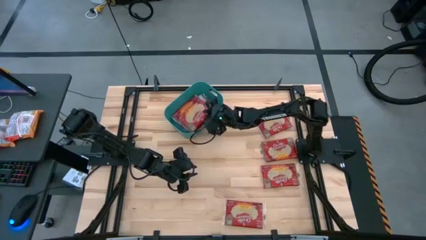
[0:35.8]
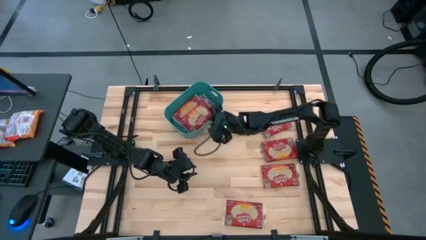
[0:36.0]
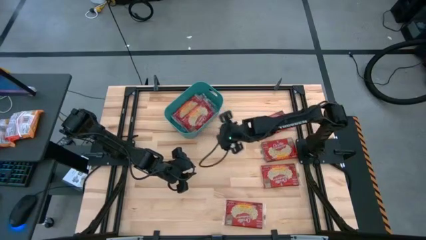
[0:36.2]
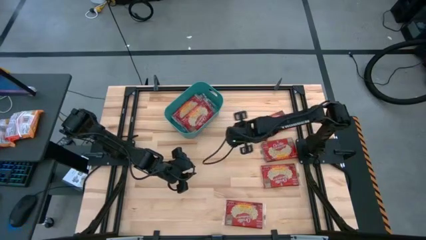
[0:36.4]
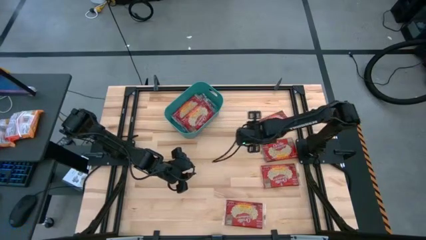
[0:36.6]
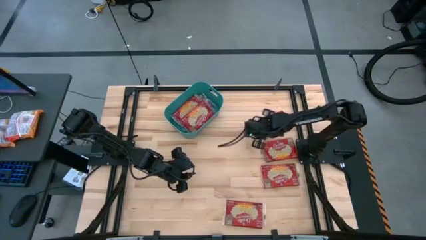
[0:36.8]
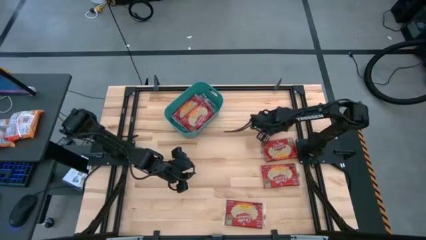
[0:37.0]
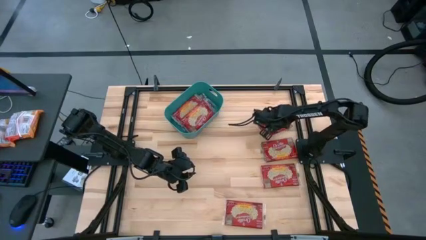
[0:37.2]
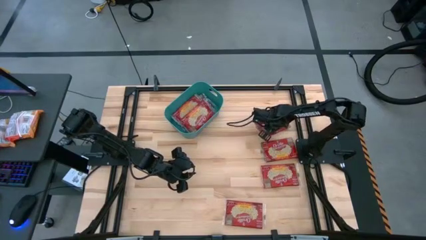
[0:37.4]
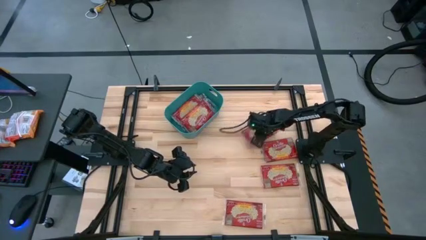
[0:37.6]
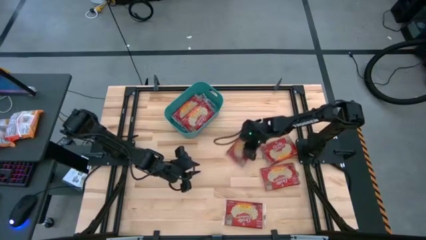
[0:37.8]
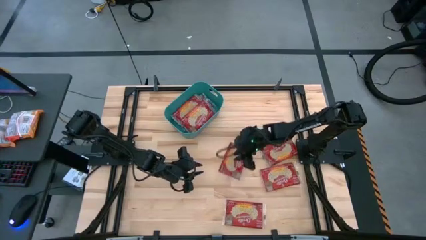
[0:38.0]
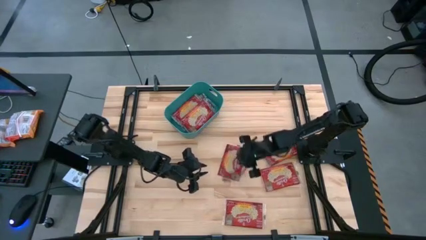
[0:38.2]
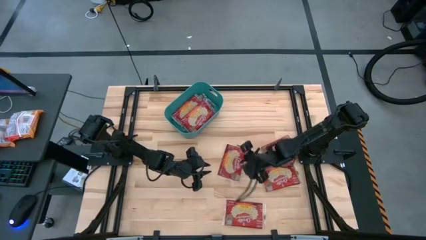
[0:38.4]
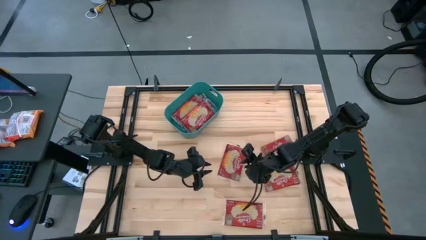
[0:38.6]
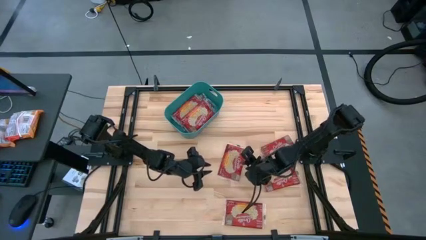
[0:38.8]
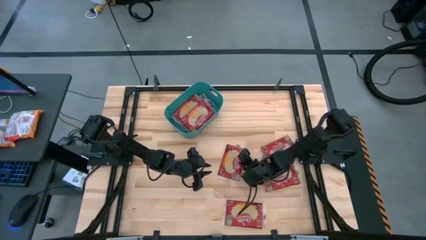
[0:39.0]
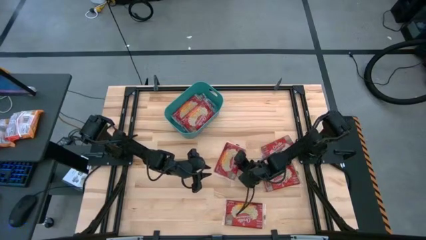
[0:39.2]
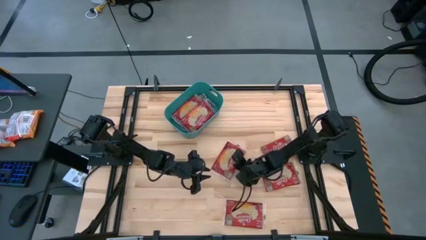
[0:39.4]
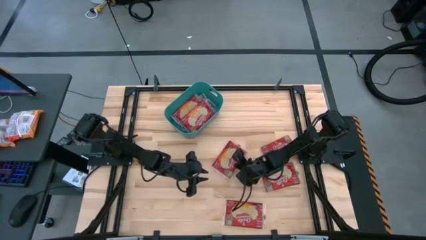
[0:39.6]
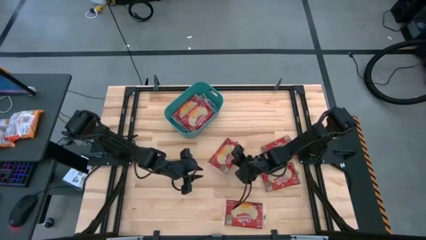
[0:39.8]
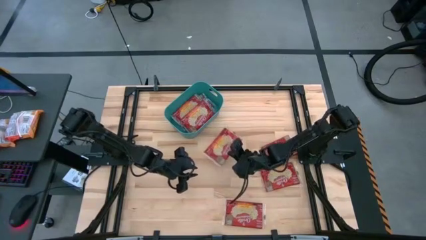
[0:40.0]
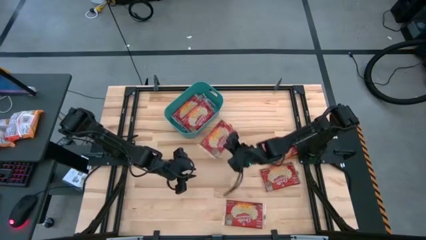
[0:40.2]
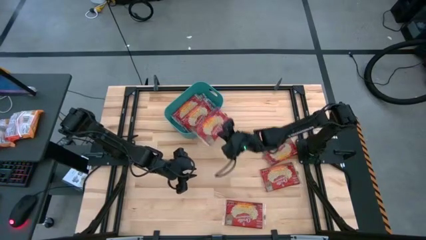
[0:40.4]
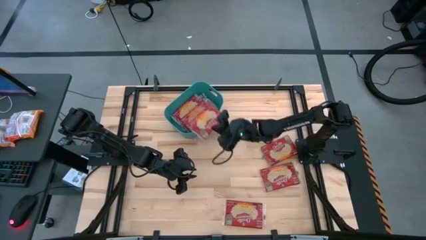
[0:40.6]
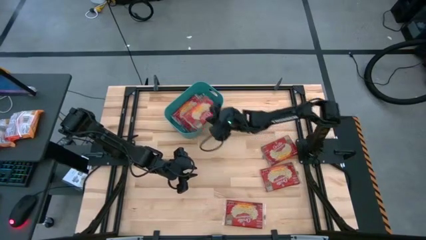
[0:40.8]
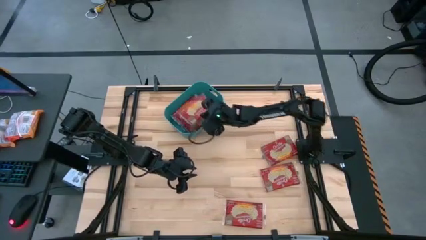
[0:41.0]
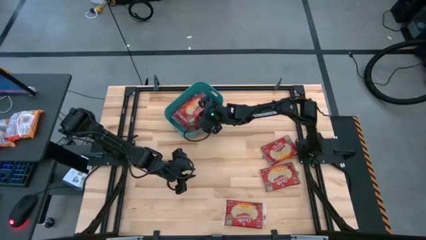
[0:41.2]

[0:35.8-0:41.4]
Task: Sort popcorn bags into baskets
Put the red popcorn pack into the blue bin

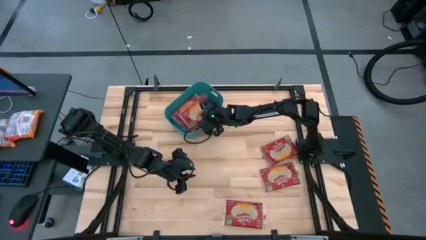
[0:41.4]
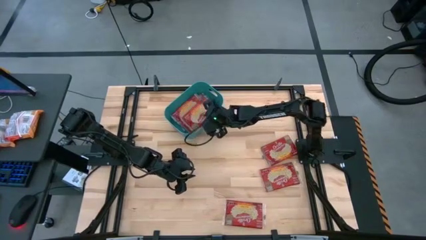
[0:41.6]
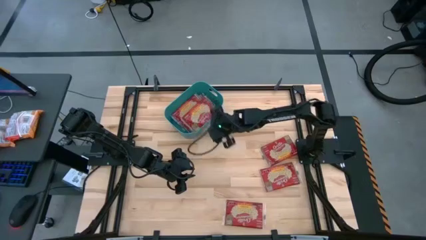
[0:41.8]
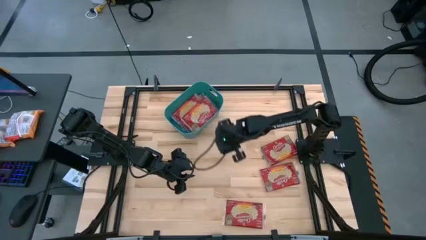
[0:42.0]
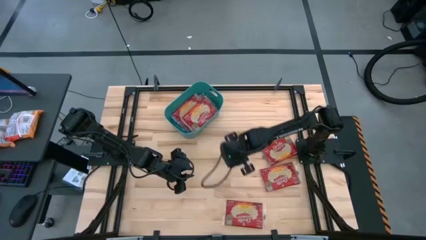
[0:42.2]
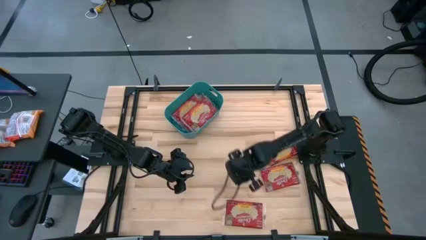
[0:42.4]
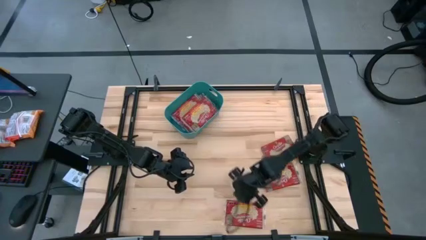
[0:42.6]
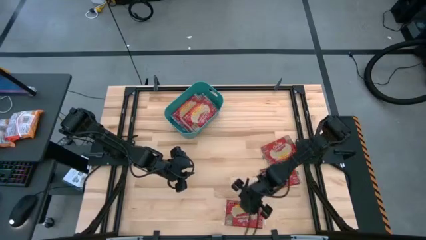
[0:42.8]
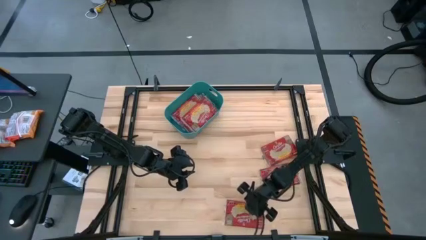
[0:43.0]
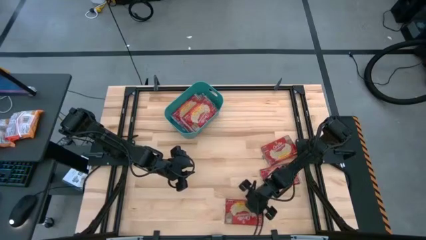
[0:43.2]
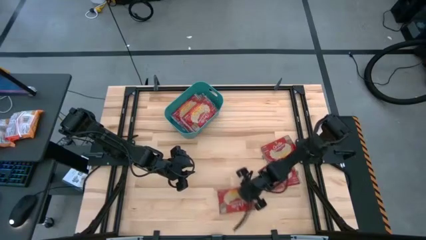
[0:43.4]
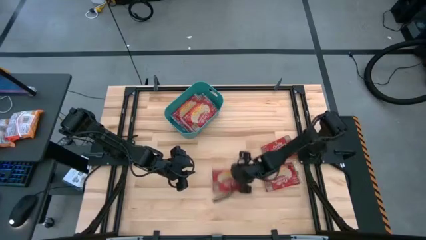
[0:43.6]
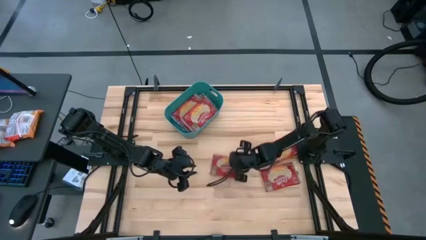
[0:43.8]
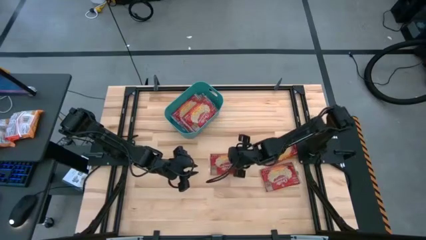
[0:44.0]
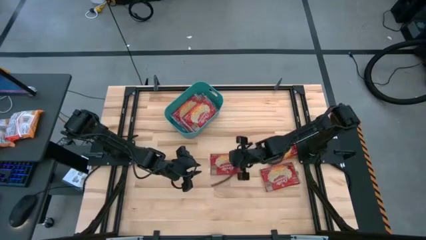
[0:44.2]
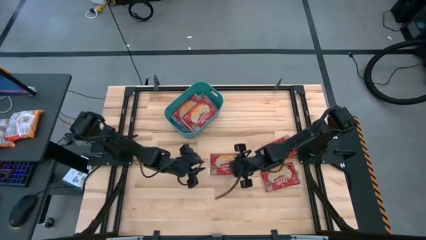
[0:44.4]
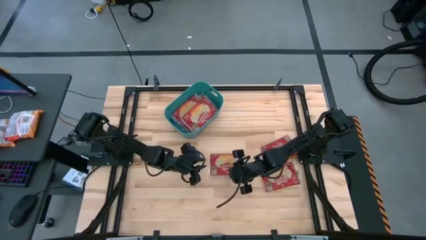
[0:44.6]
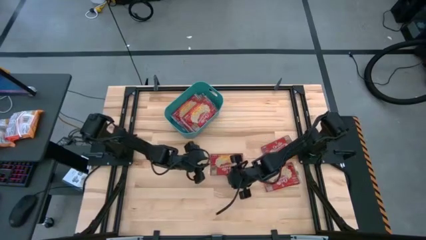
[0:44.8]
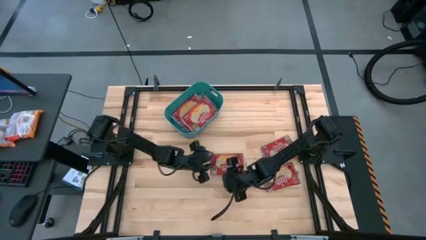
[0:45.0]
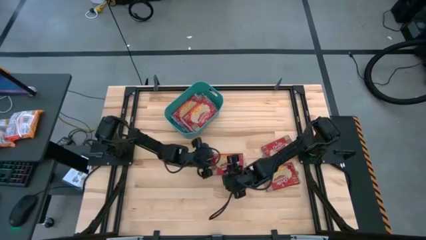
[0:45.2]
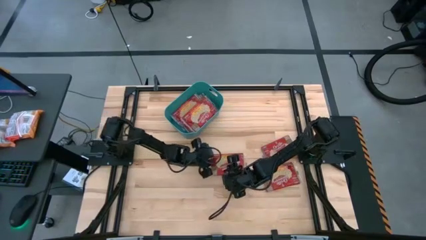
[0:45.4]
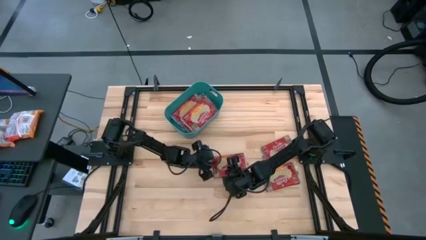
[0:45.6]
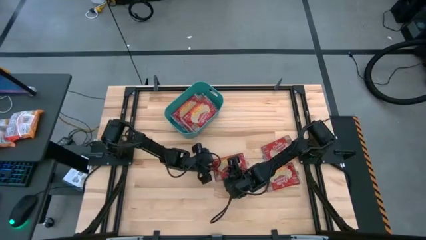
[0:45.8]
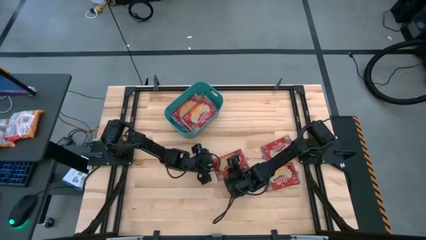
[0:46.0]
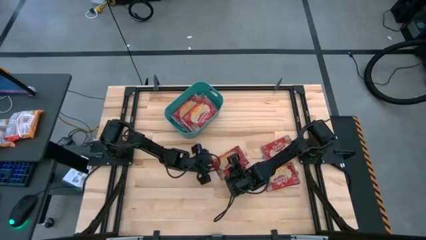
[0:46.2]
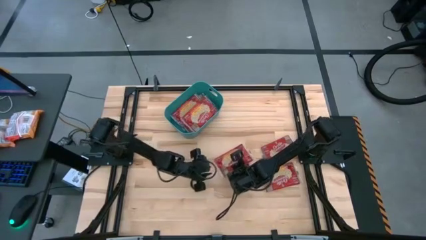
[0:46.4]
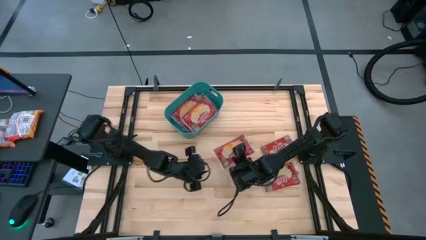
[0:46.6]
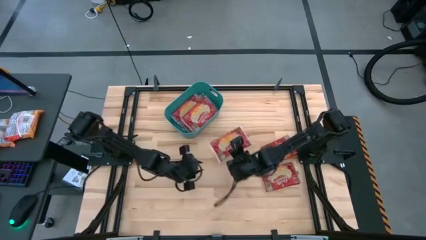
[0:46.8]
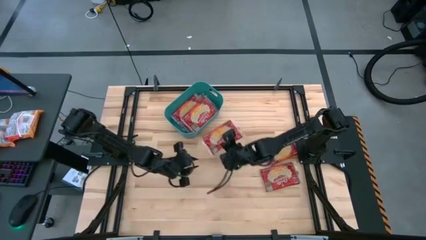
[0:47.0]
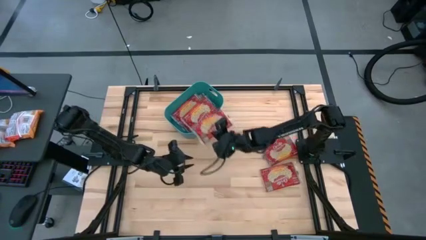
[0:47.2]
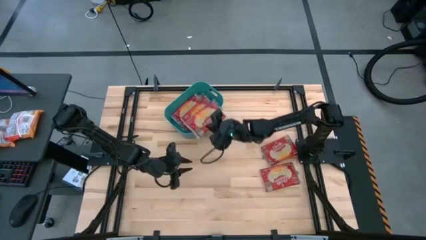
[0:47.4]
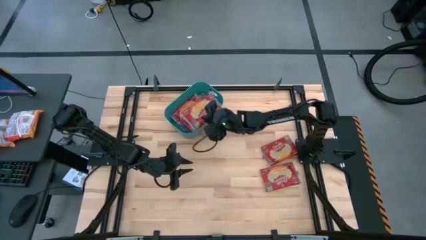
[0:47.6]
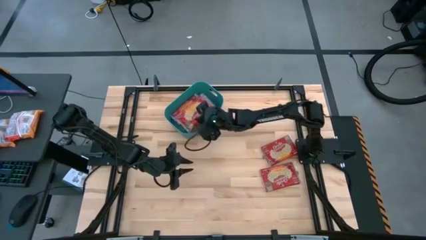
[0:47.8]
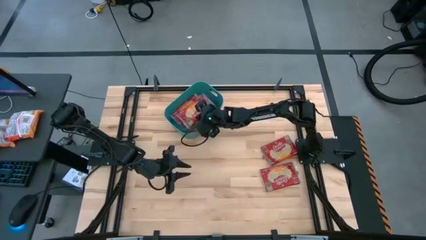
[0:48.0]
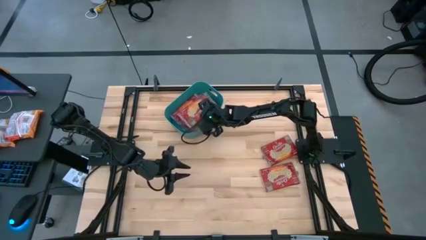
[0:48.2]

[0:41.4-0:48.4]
Put the red popcorn pack into the blue bin

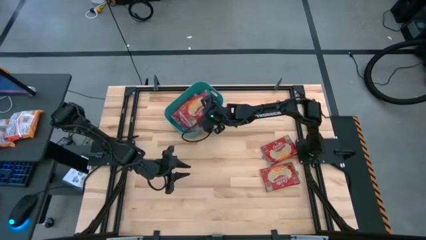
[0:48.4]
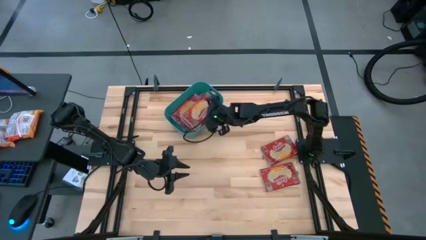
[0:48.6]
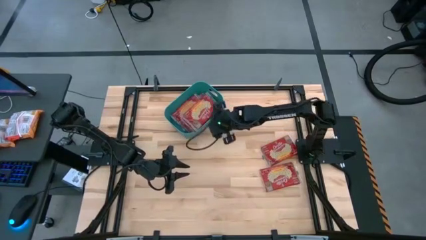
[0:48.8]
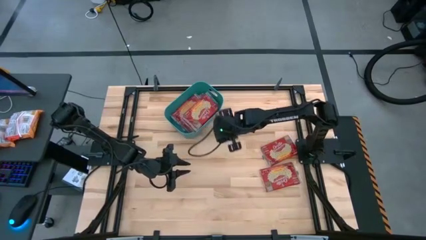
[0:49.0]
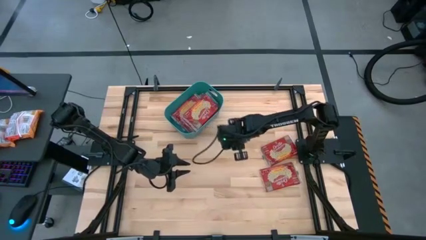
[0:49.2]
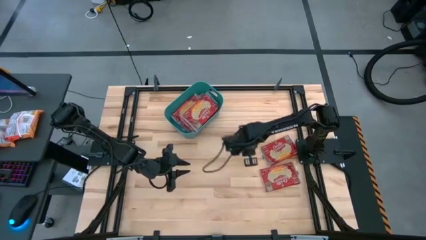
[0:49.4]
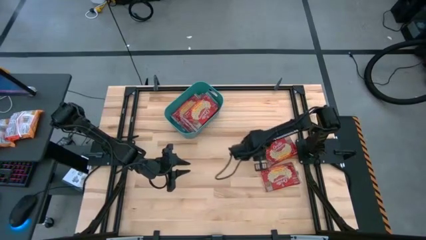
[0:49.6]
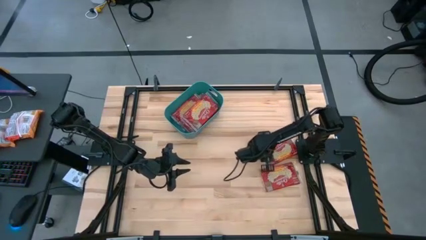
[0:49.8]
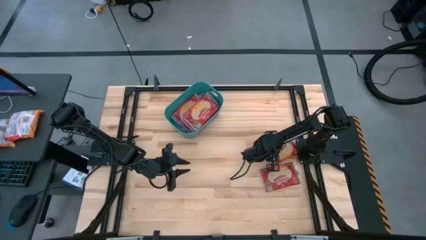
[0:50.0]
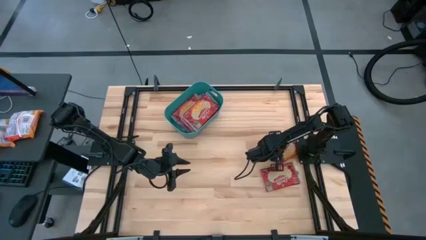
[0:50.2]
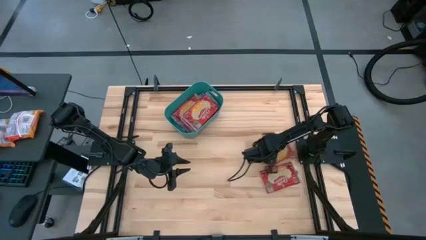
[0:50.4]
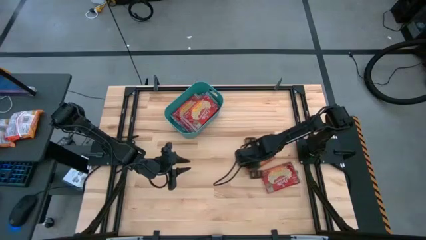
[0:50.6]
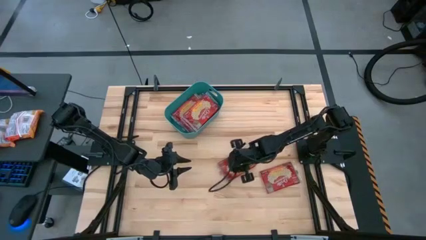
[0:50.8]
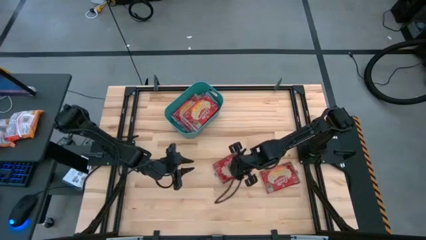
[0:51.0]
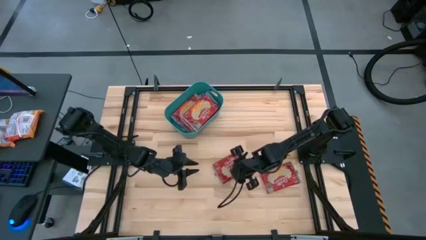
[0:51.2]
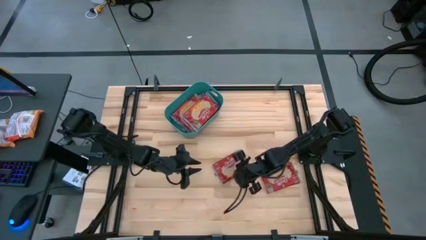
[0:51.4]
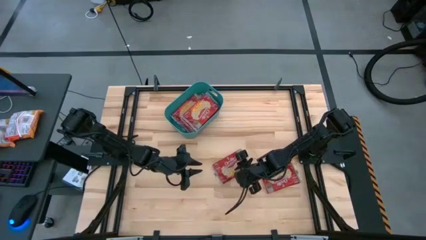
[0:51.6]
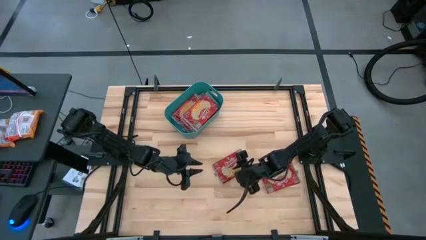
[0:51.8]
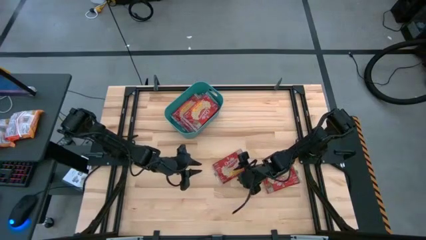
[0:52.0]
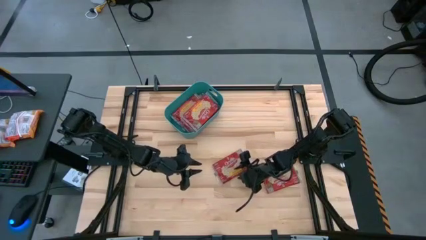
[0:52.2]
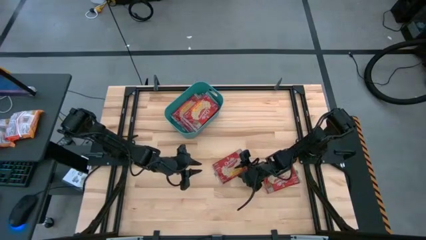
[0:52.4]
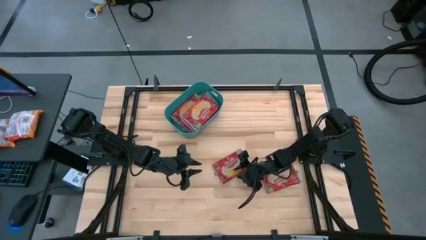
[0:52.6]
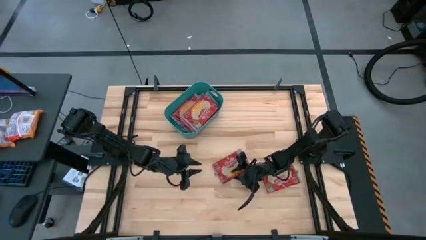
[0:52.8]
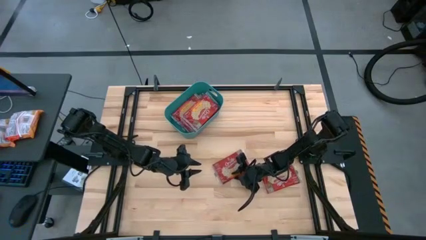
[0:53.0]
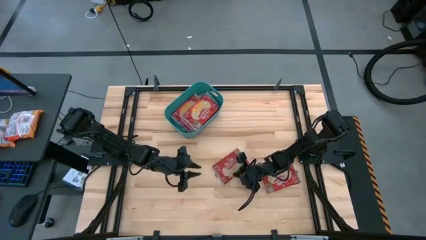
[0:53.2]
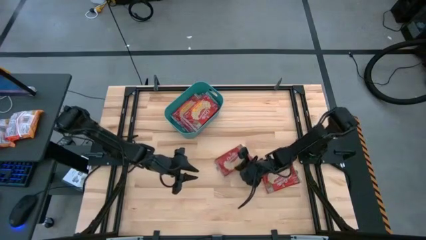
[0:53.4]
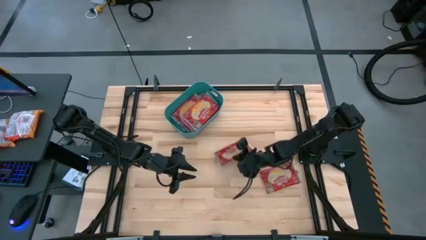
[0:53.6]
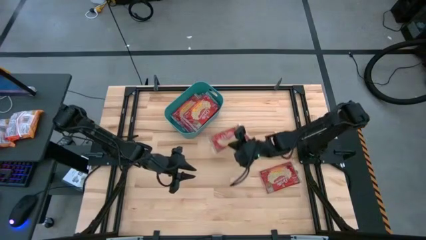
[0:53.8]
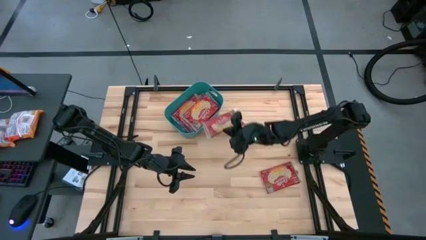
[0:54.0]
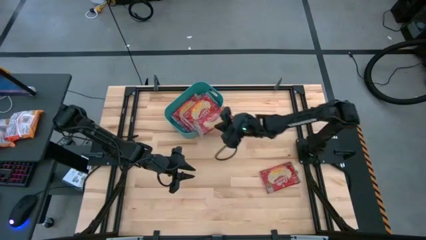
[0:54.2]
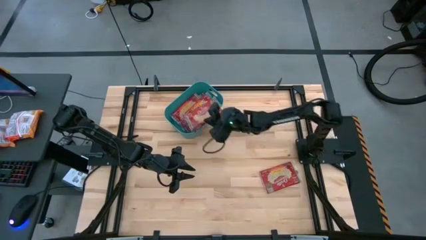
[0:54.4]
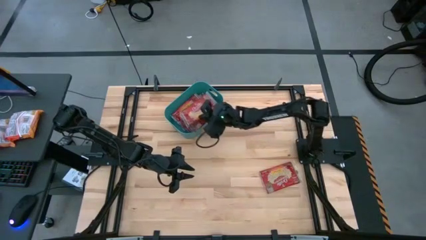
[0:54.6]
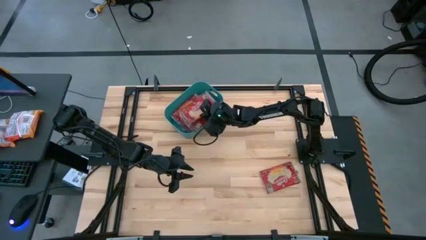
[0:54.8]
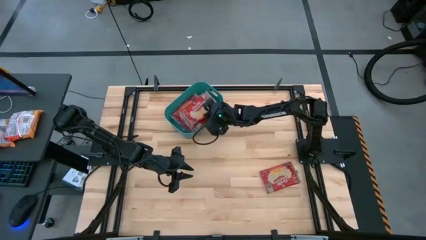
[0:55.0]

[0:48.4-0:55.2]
Put the red popcorn pack into the blue bin
